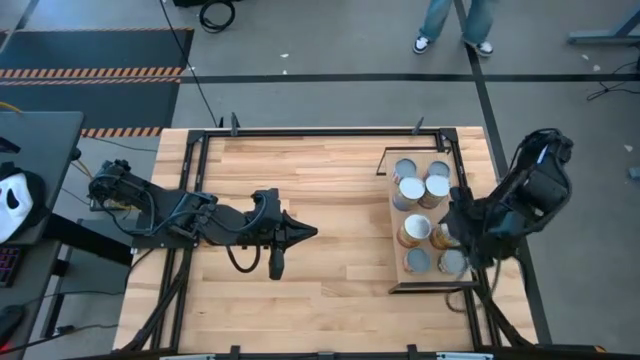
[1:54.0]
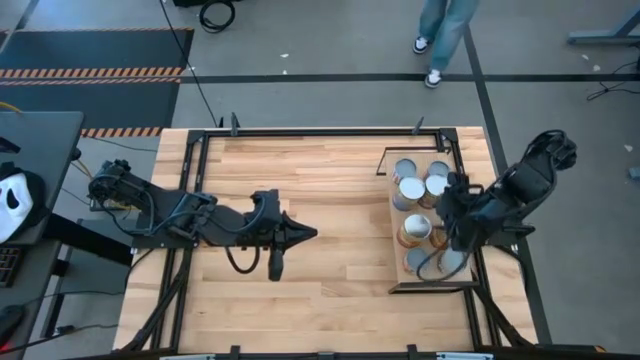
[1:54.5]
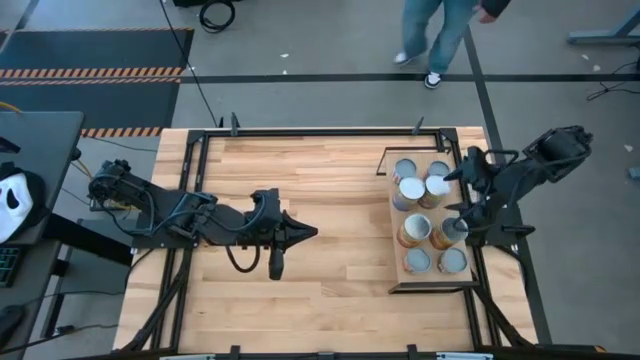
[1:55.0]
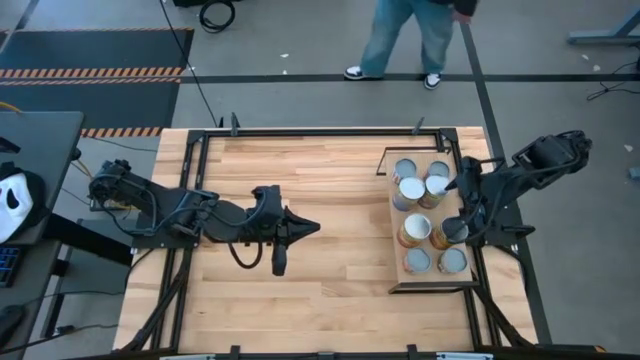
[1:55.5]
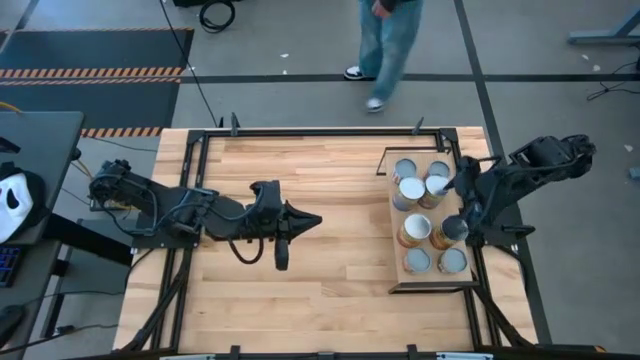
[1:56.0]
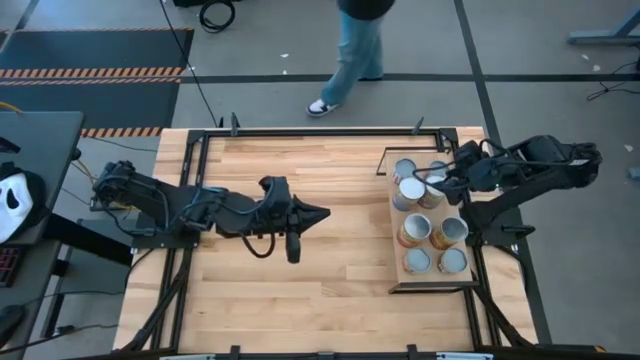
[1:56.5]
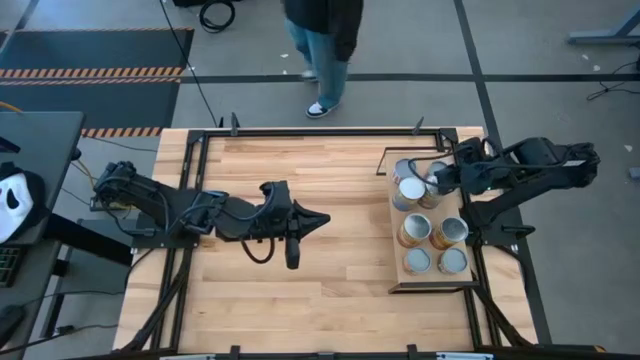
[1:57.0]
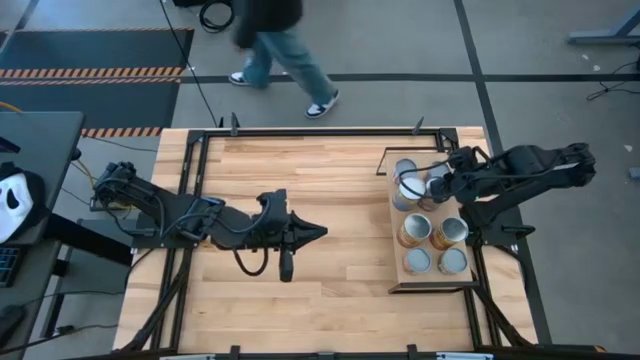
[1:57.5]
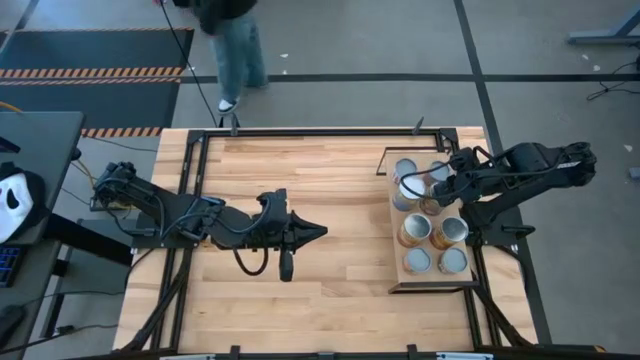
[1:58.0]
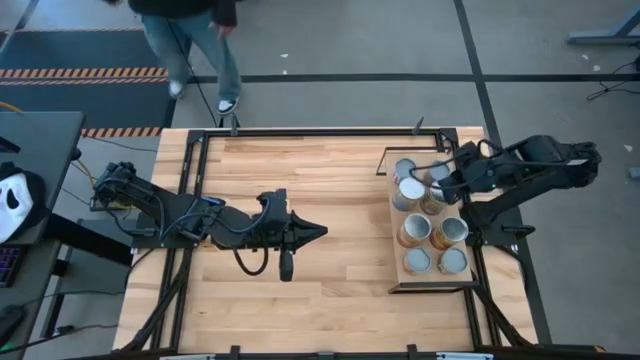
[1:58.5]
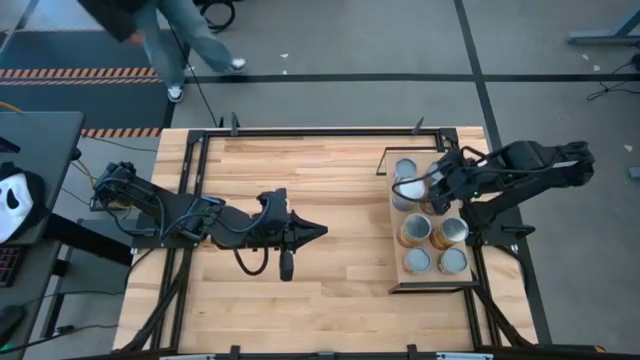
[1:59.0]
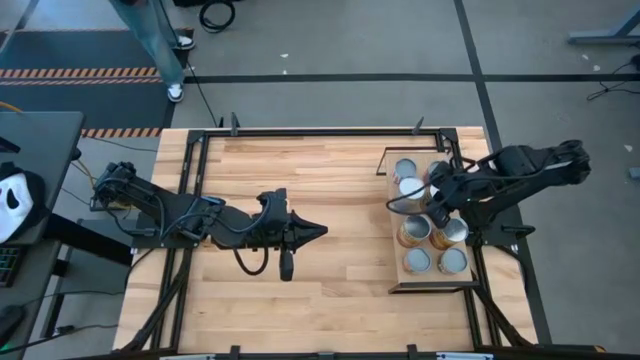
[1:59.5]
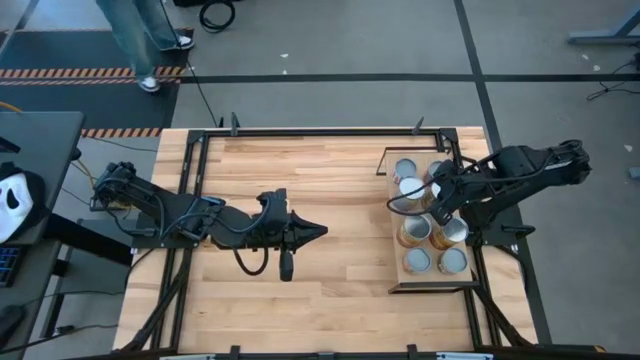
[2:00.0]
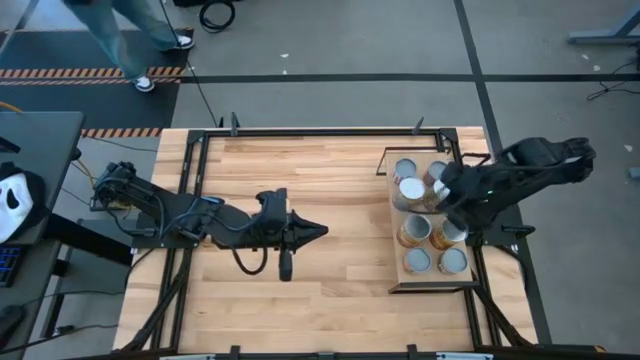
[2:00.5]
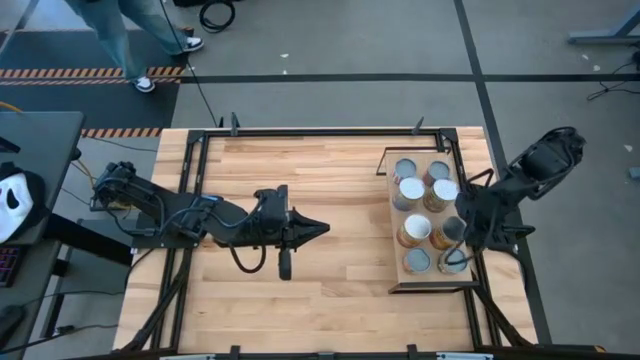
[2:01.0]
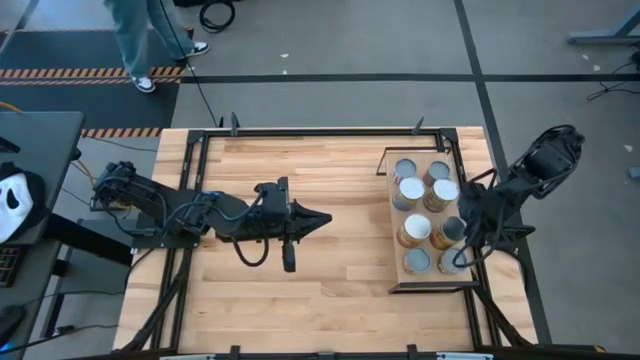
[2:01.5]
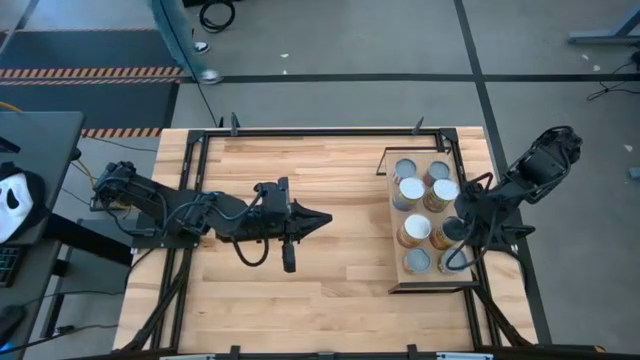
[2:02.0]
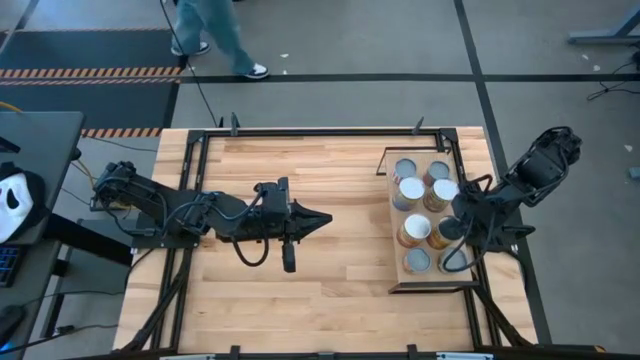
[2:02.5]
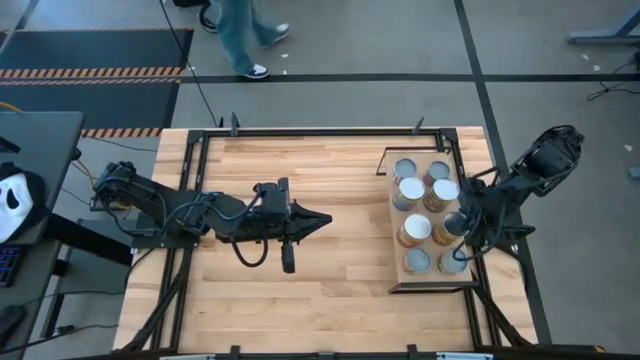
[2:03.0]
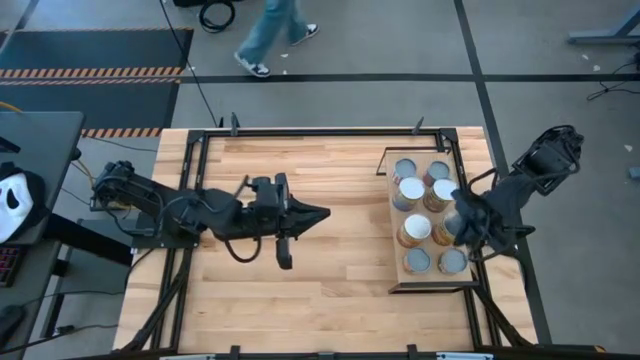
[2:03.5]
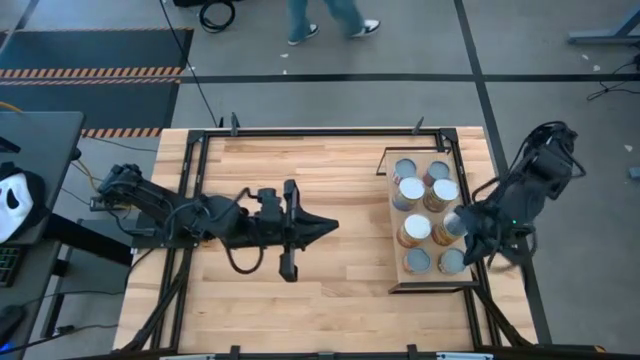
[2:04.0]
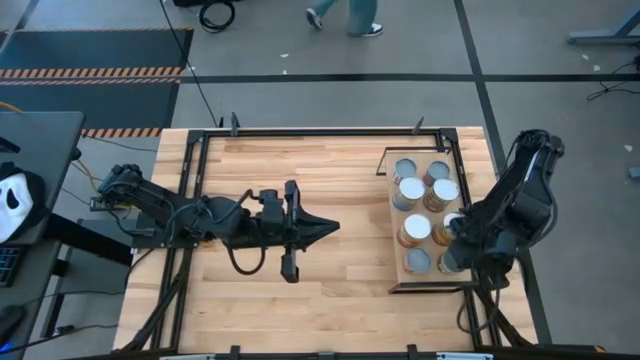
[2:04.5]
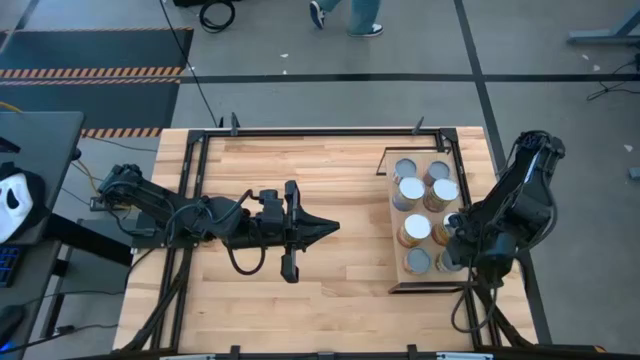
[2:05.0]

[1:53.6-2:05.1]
Task: Pick and place cans onto a shelf
Adjust the canned goods on the shelf

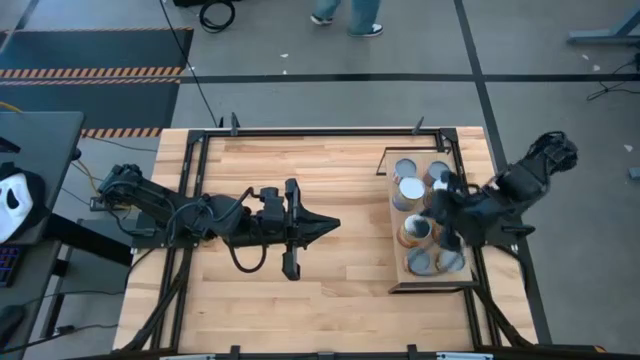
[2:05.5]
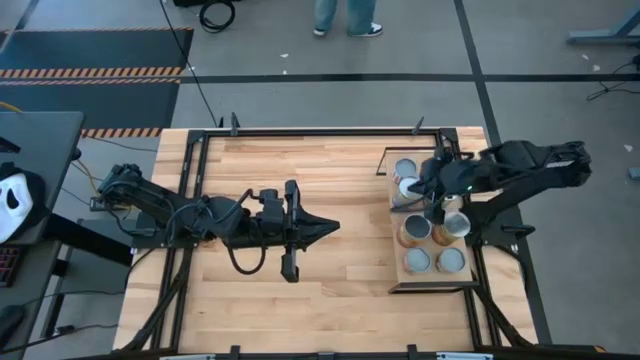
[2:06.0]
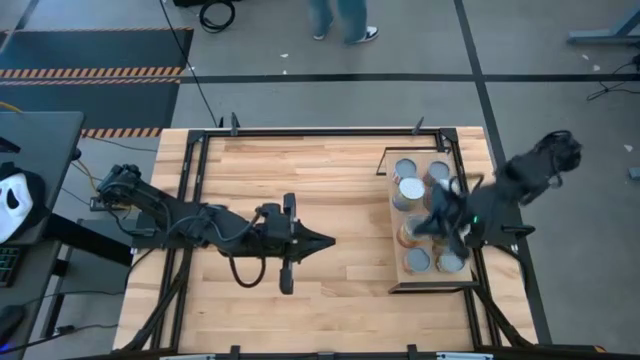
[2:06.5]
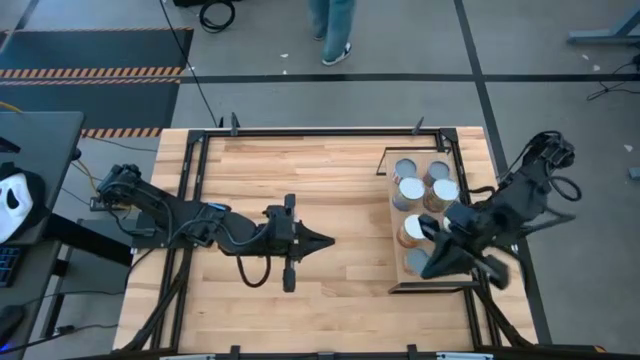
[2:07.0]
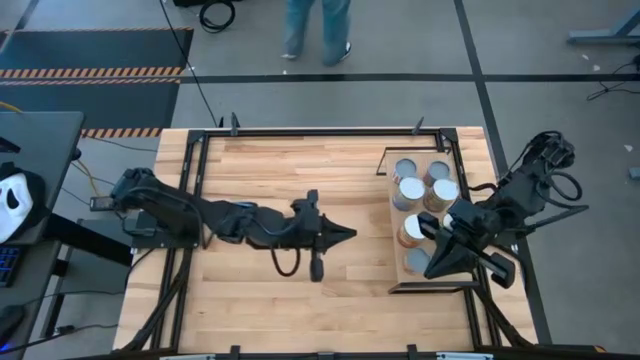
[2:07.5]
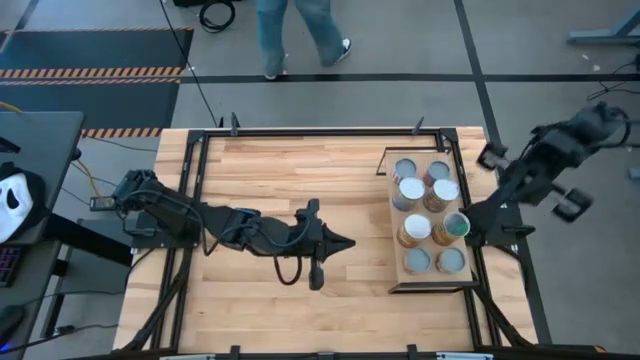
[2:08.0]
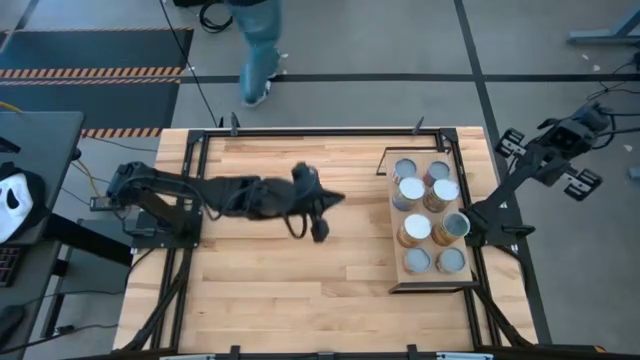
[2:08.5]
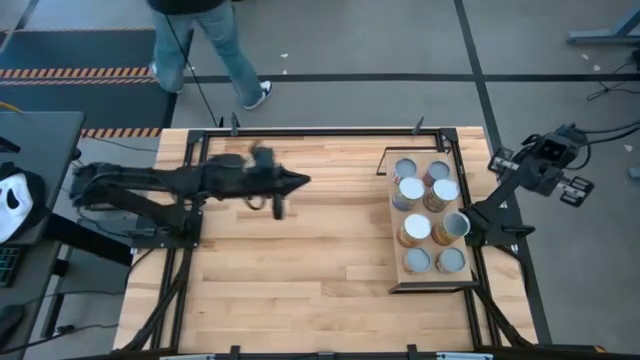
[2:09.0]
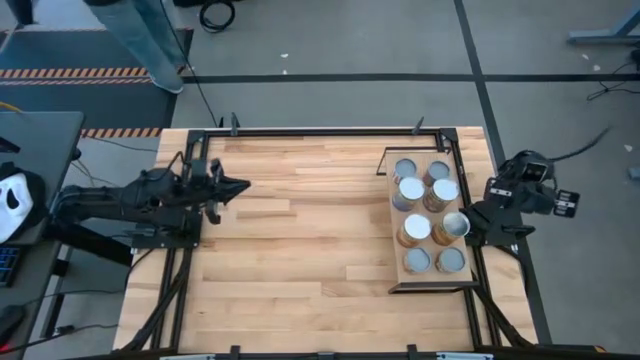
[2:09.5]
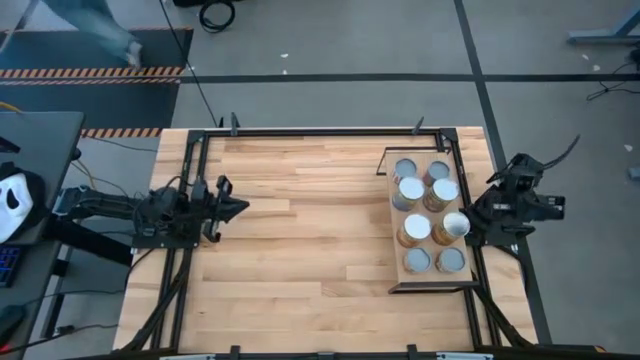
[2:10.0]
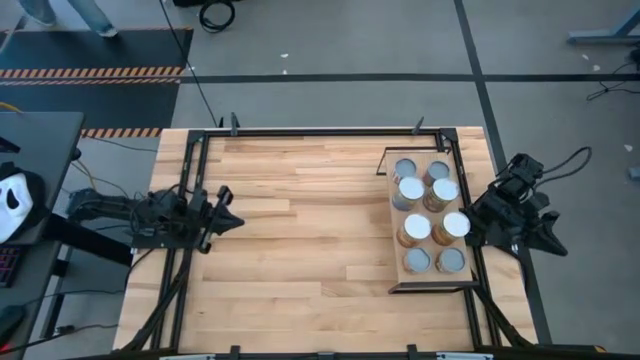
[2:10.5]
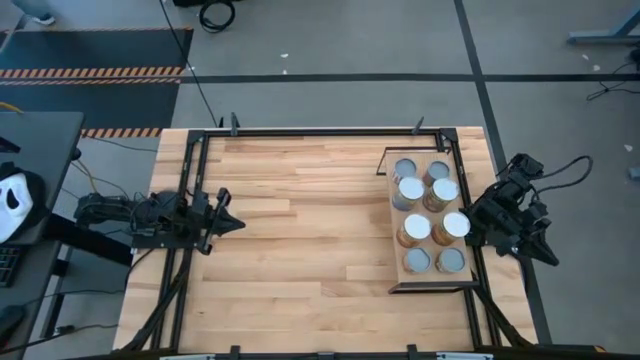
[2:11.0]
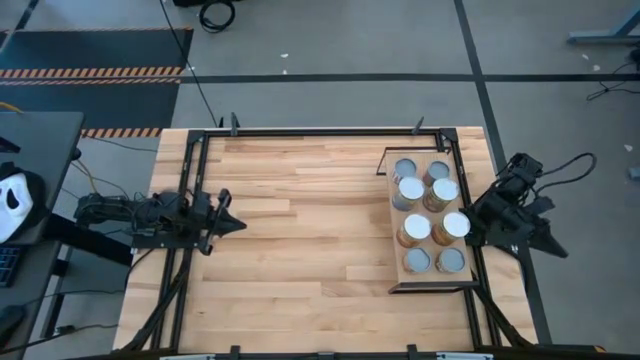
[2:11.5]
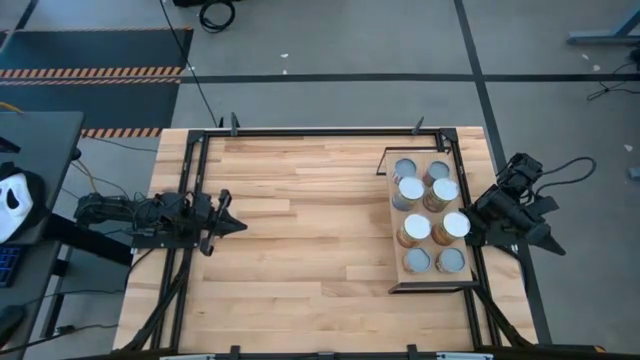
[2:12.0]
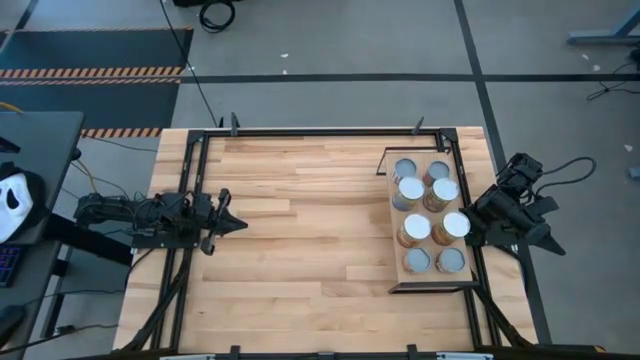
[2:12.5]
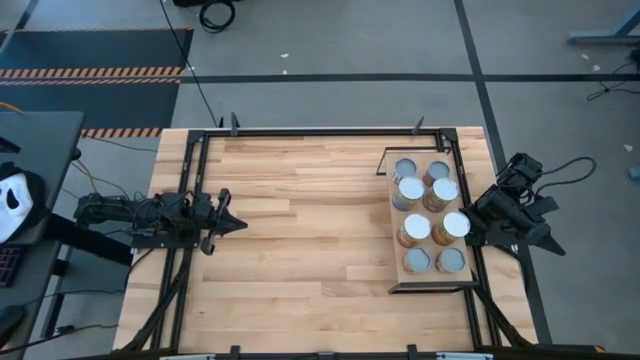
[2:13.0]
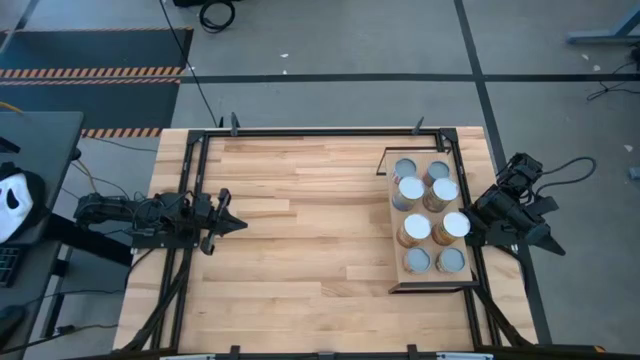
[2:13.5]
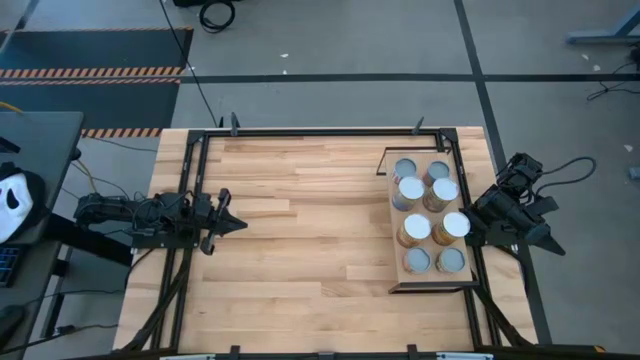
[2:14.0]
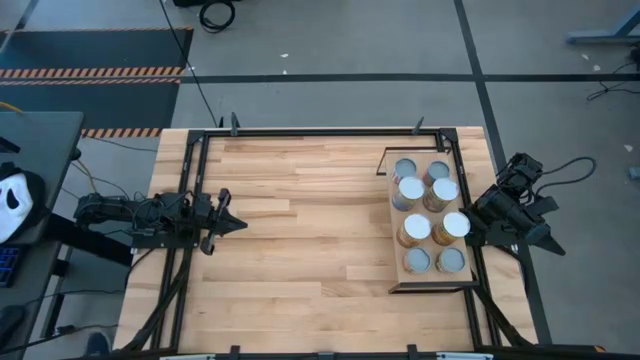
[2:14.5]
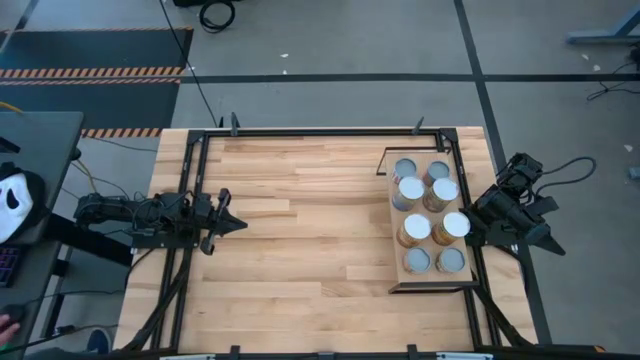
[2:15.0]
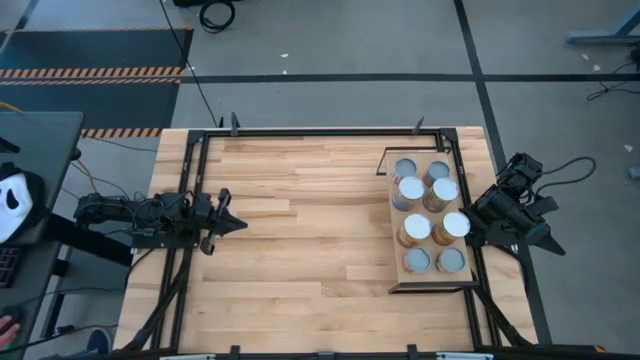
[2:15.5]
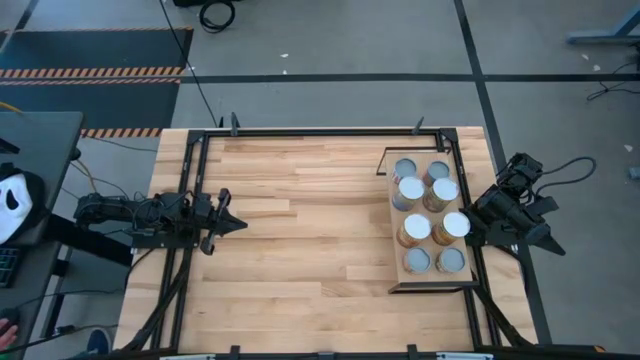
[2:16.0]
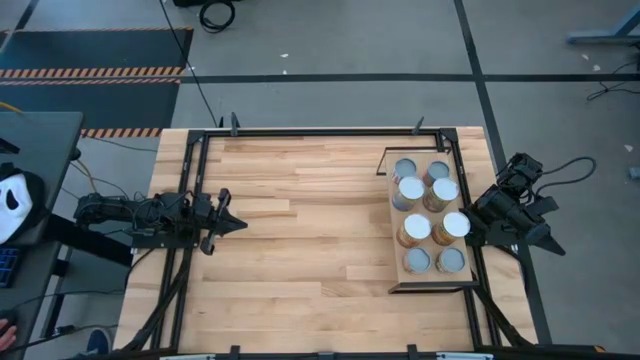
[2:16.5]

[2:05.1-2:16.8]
Return to Home Position
